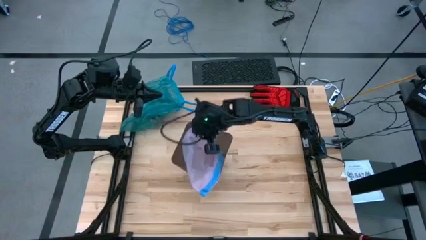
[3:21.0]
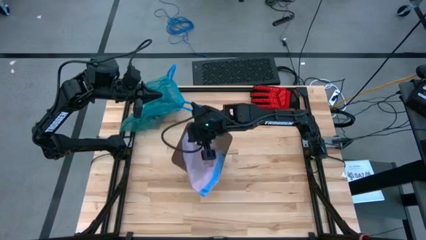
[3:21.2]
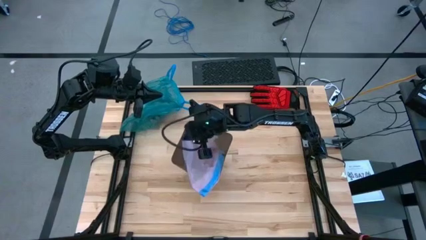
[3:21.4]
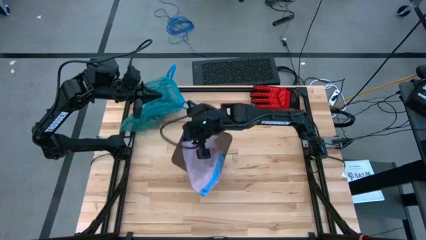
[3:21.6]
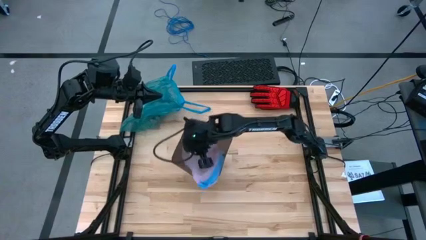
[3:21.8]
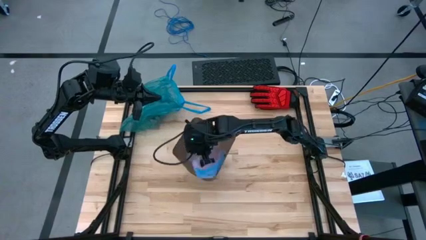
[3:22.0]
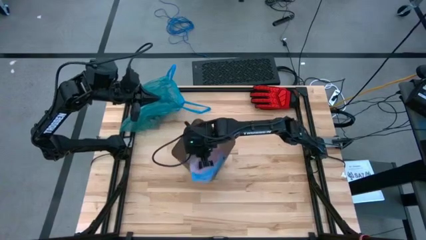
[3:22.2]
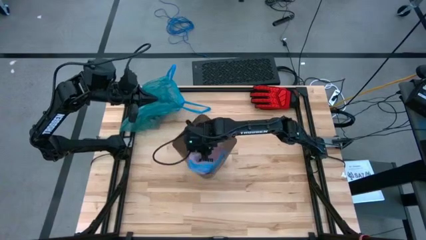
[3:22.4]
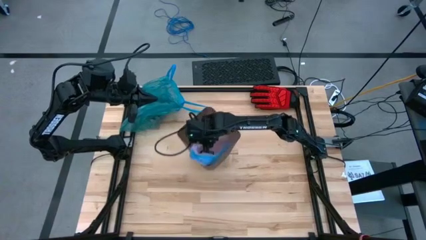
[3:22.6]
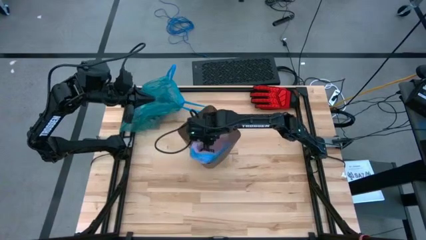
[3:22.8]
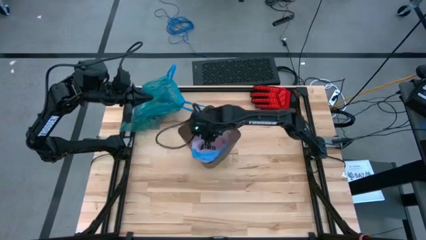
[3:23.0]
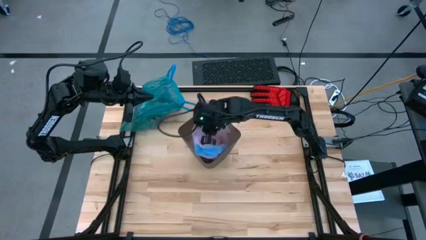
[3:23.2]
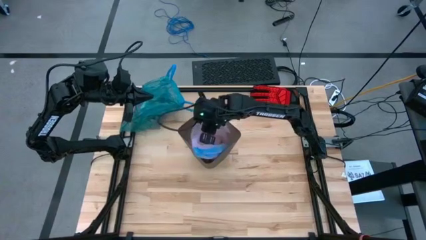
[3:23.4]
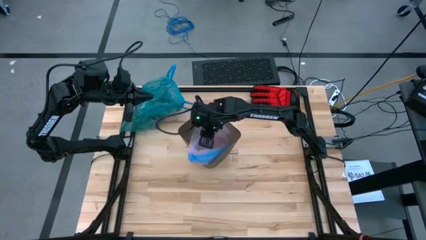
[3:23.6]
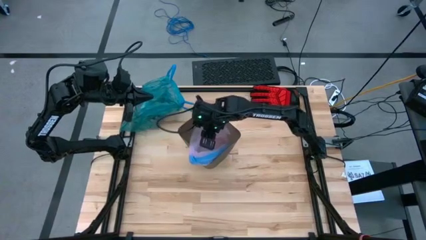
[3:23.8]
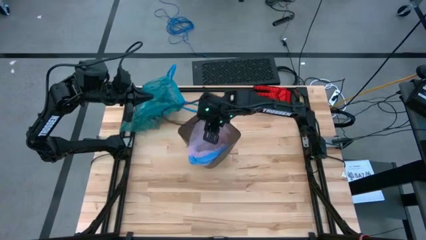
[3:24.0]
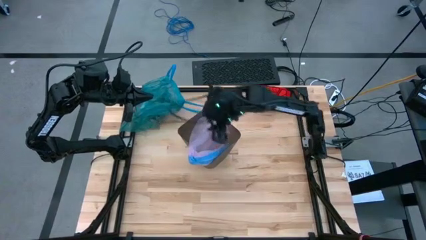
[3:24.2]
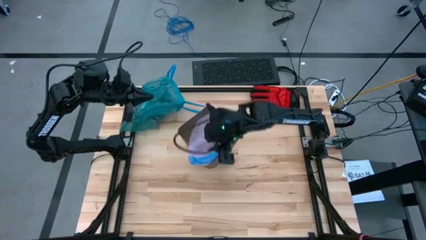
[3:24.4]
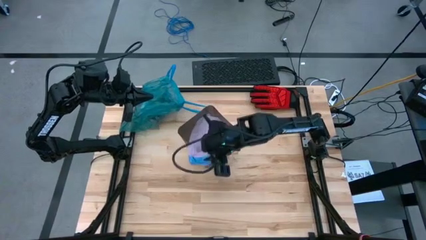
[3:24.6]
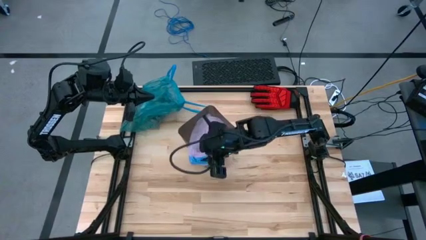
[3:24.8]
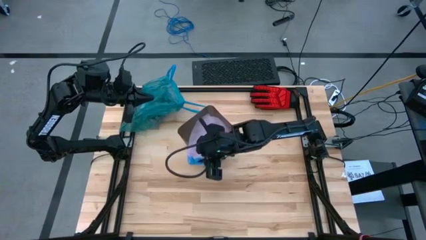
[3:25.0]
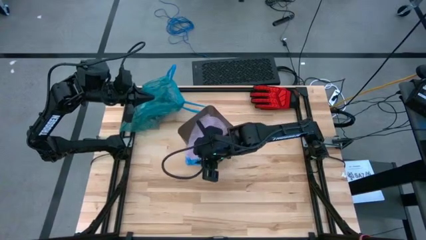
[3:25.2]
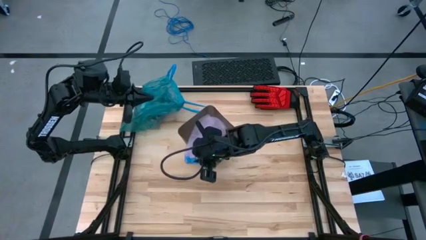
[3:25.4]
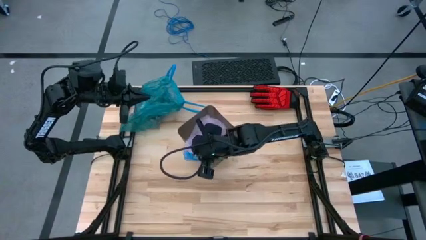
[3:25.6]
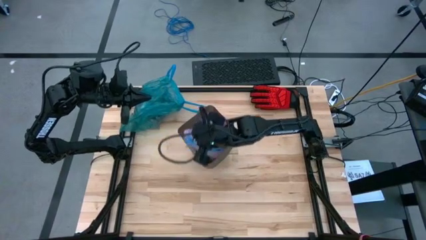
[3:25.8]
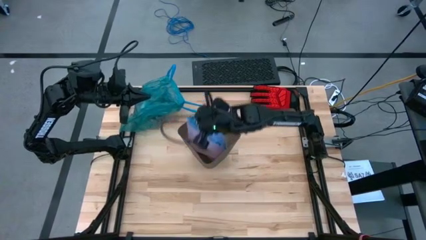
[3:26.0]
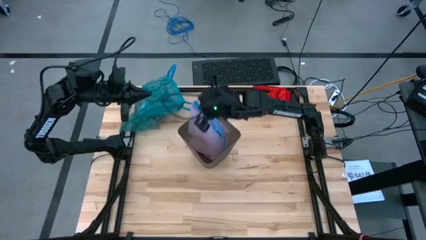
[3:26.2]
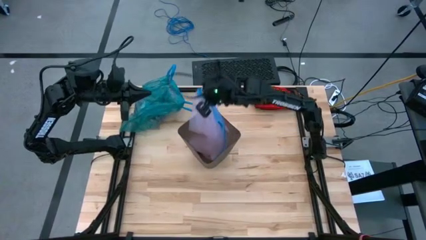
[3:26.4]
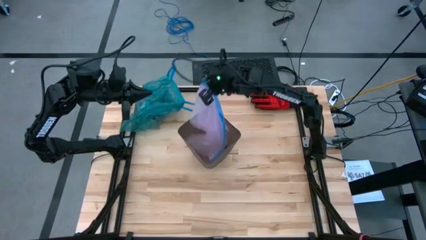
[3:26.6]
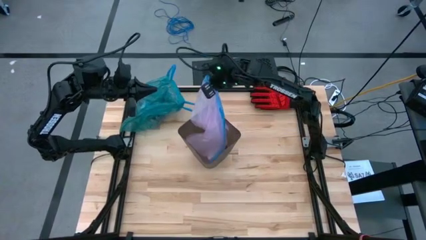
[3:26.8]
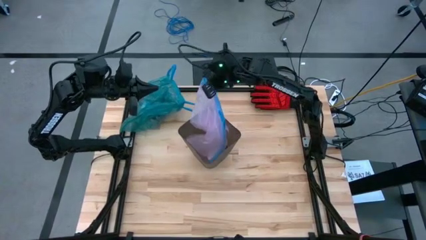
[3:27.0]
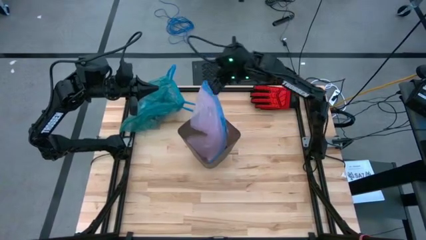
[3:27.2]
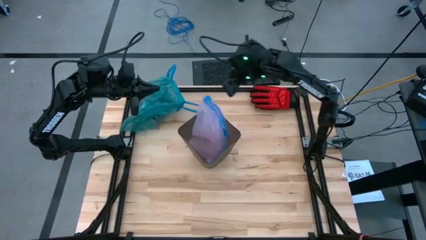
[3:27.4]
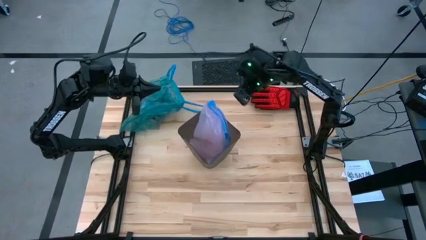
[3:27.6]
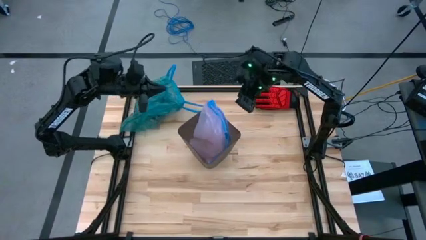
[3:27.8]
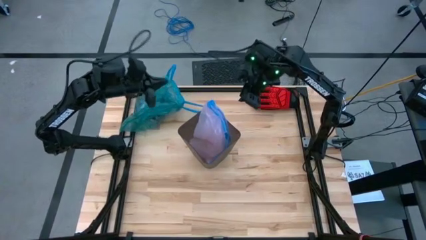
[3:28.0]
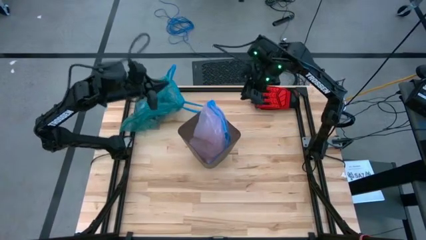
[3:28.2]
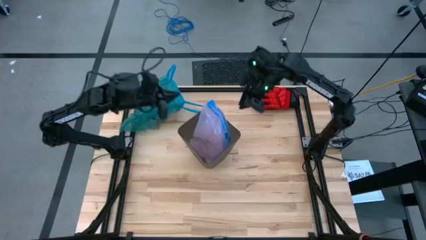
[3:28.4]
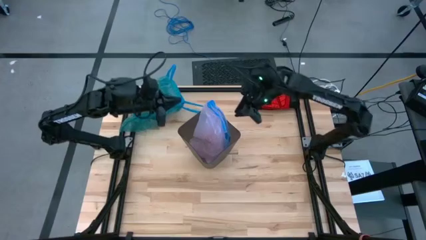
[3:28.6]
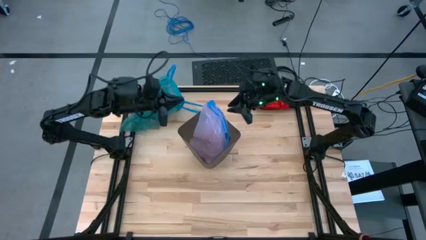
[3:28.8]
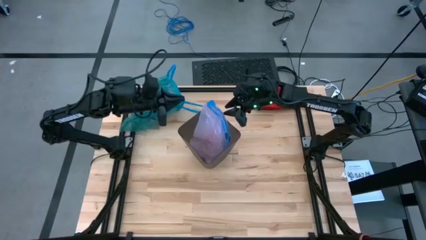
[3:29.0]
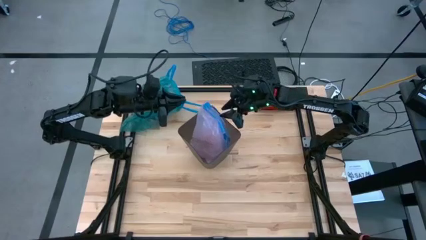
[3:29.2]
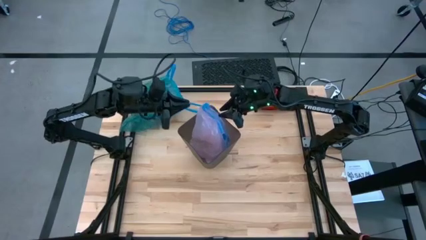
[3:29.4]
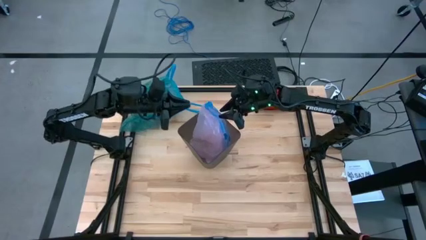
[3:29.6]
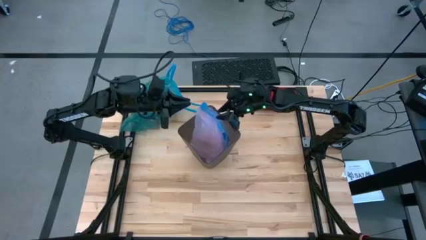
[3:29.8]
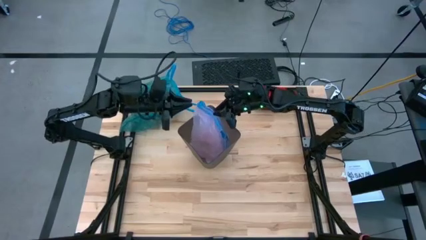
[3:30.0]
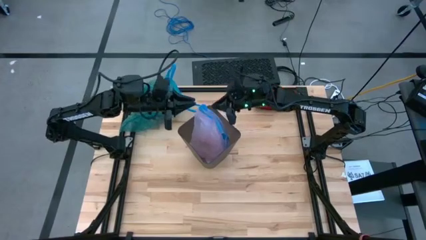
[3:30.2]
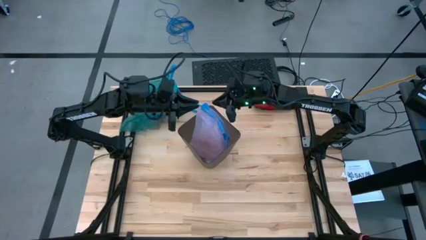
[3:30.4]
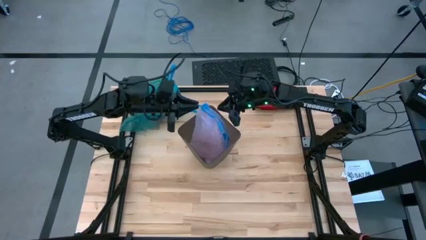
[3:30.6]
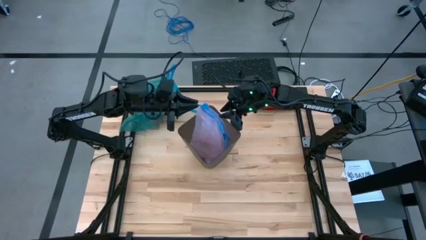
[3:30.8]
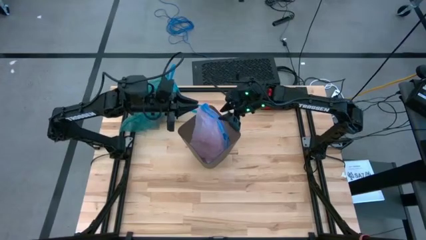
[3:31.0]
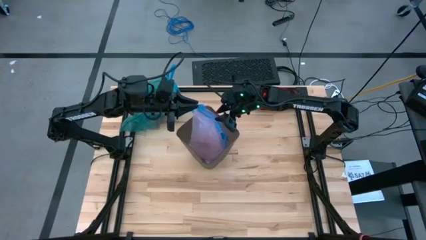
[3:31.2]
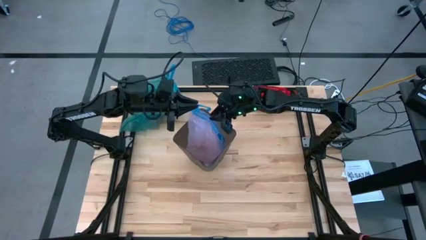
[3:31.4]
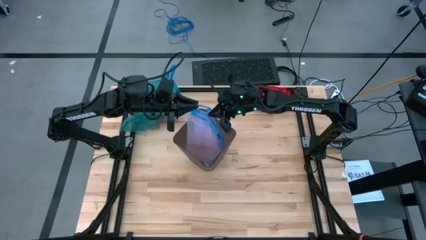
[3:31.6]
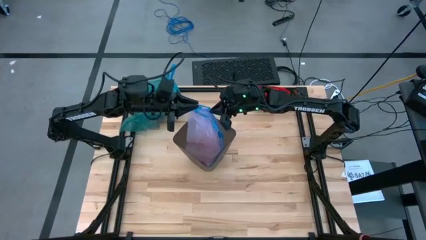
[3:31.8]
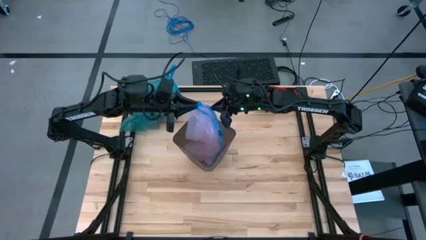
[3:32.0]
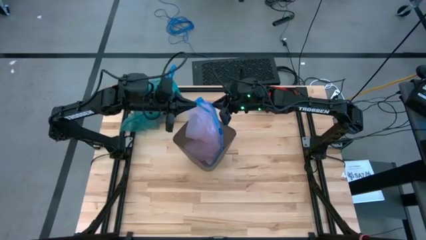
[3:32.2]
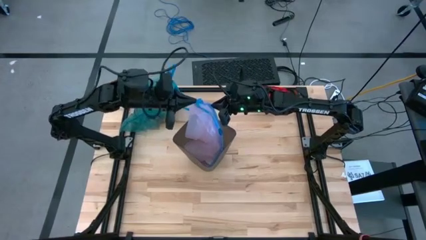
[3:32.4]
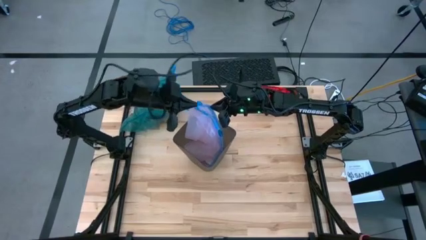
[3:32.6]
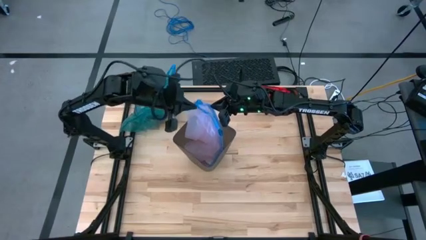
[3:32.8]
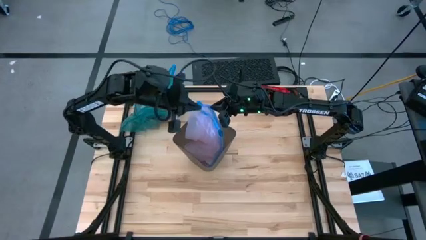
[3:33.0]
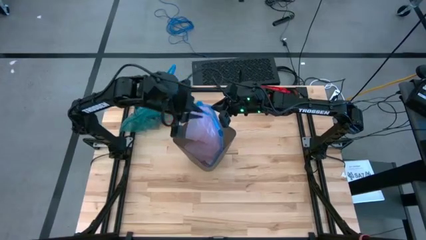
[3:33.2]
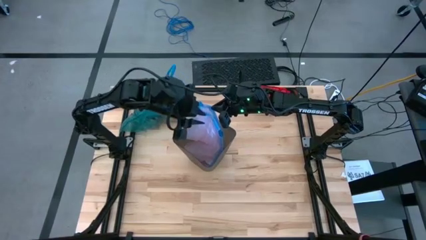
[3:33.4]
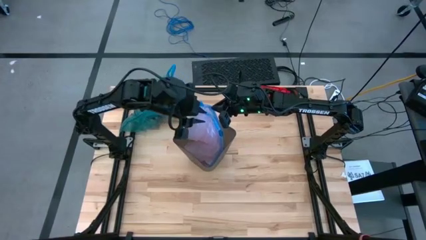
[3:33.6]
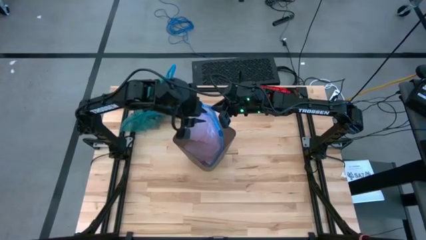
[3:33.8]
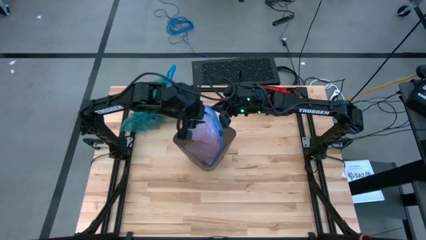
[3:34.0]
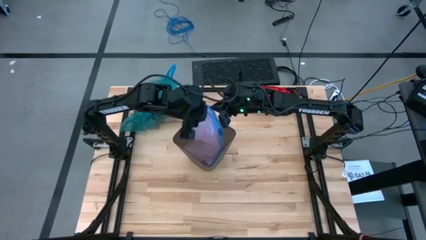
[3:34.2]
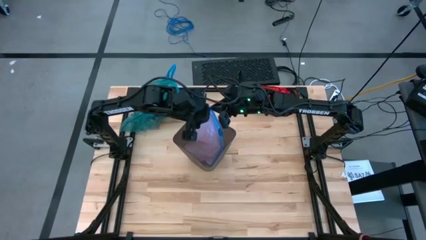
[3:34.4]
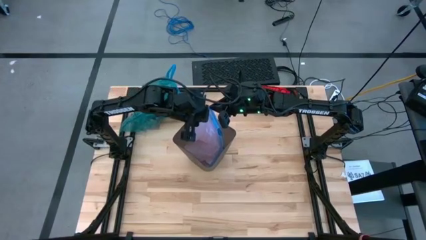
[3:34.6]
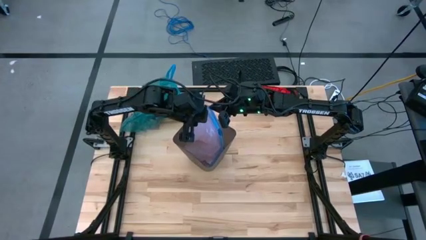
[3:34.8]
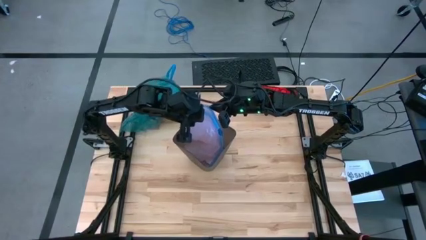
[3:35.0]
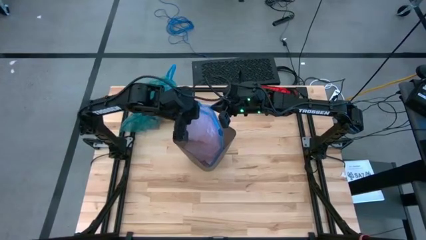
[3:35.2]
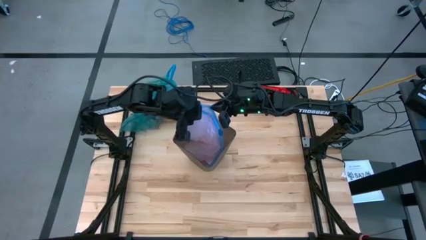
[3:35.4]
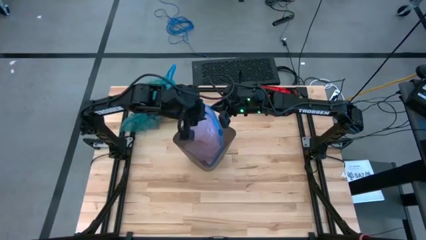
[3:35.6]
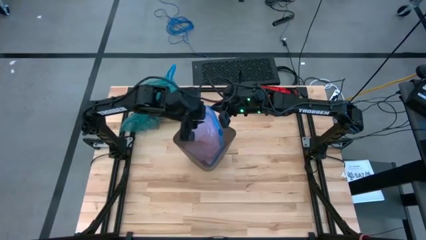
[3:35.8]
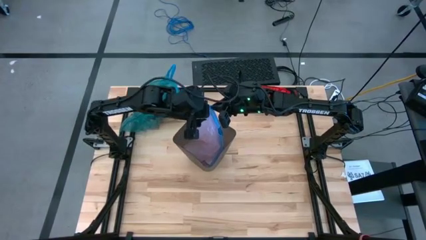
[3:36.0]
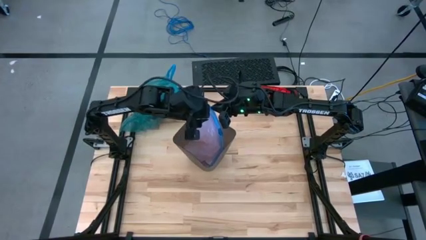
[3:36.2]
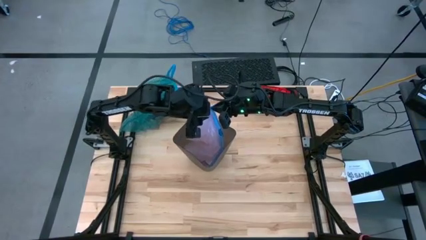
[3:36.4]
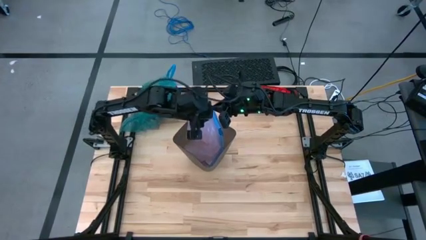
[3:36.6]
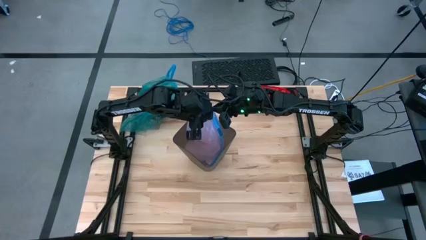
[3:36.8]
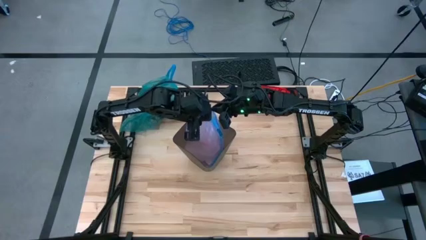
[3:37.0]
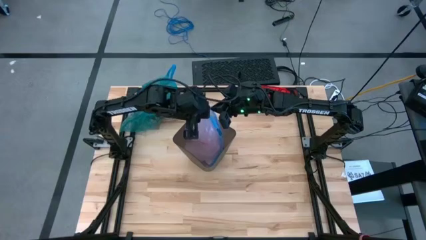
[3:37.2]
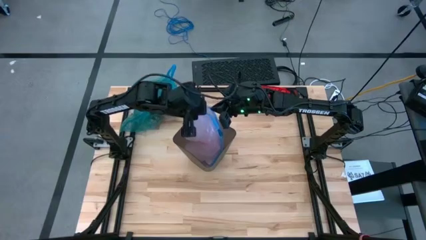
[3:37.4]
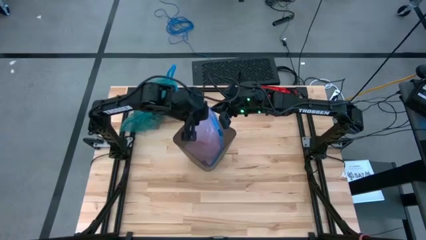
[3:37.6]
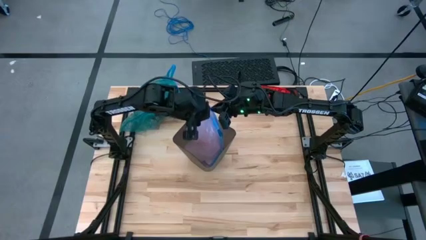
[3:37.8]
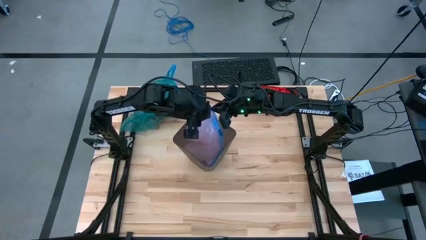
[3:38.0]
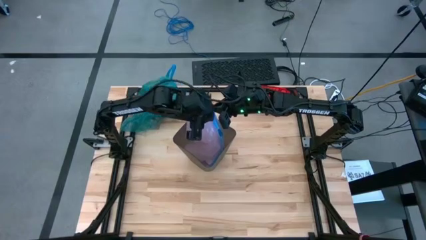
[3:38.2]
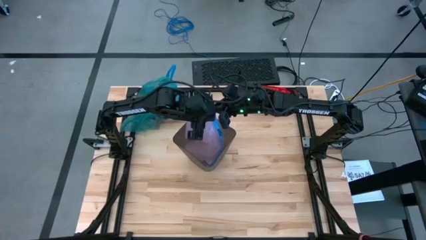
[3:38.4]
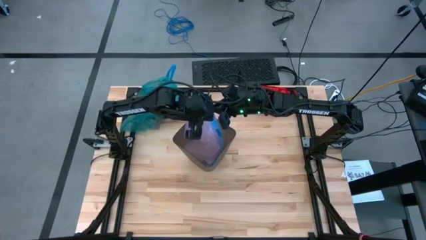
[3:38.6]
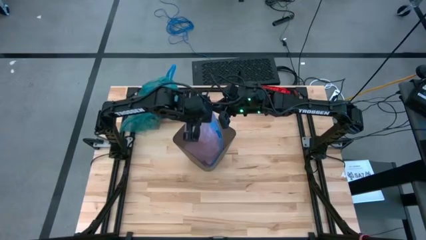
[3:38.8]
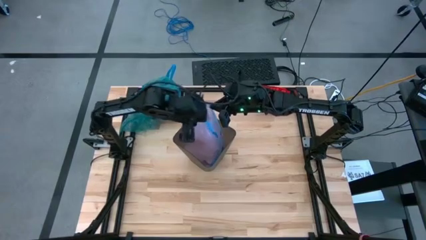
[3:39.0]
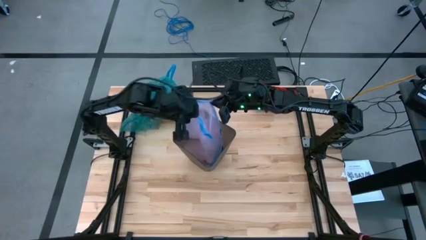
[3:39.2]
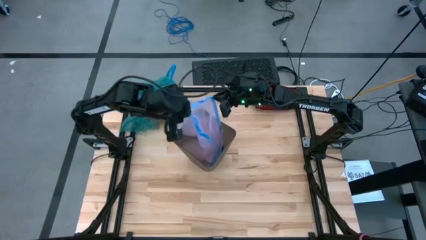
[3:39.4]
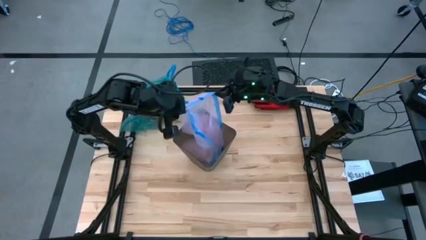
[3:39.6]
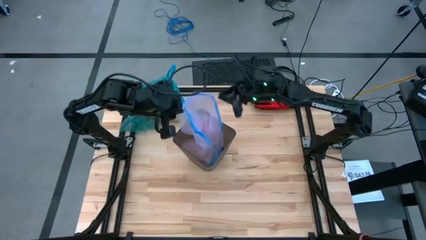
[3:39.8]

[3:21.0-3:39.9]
Task: place trash/remove bag and relplace
Insert a new pink trash bag into the black trash bin
